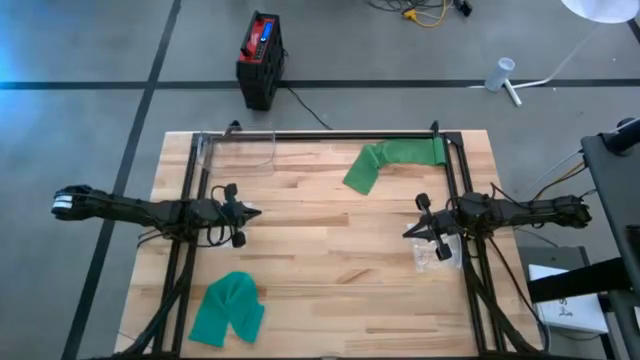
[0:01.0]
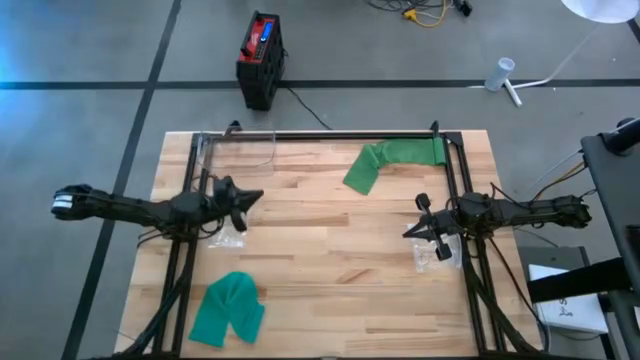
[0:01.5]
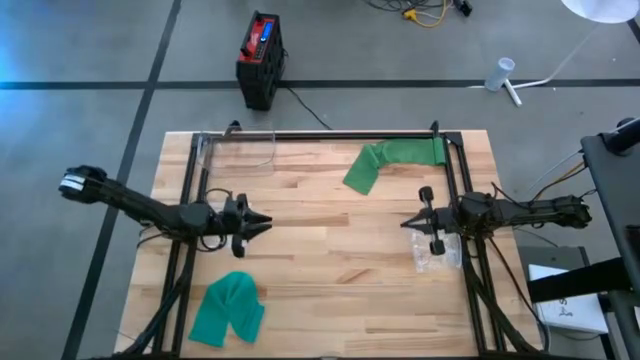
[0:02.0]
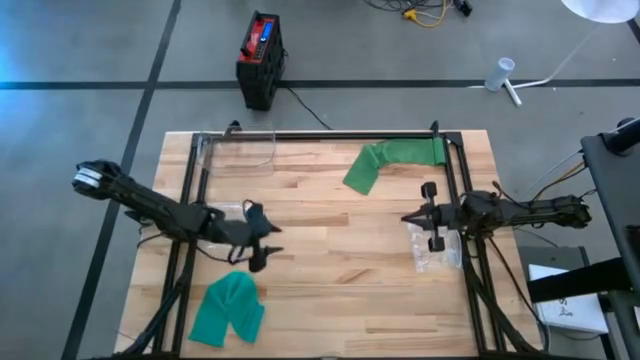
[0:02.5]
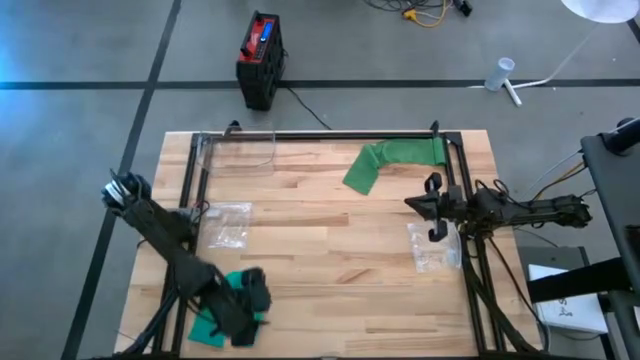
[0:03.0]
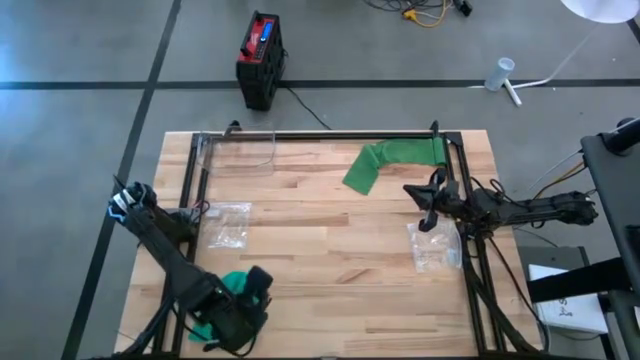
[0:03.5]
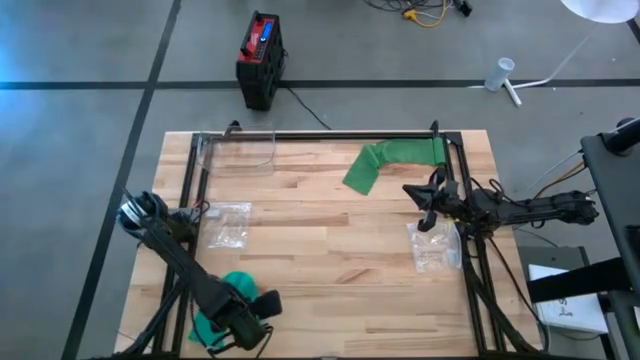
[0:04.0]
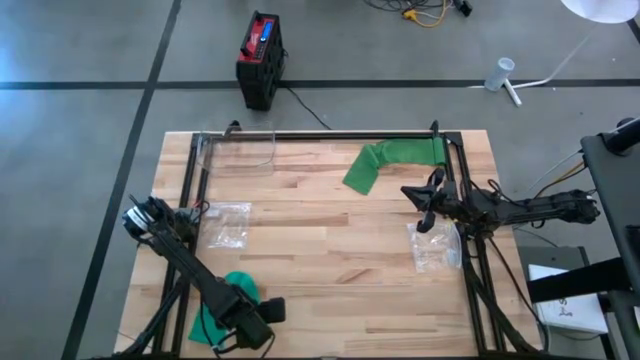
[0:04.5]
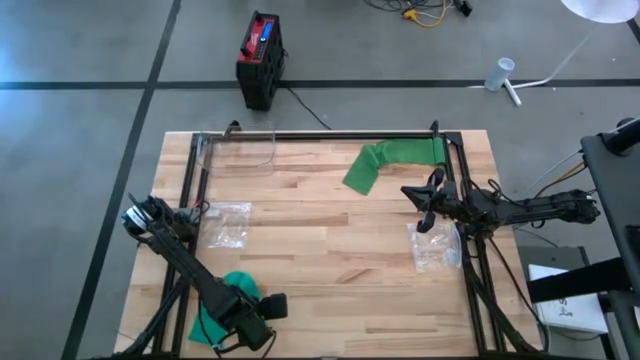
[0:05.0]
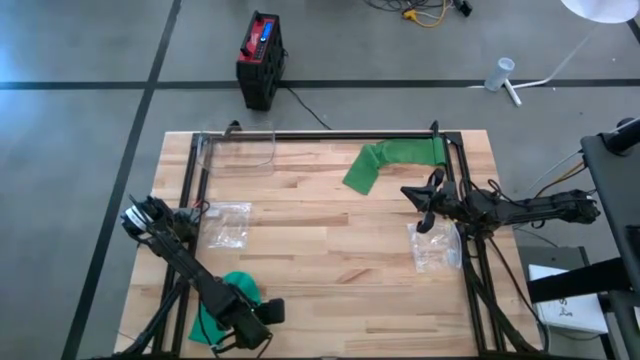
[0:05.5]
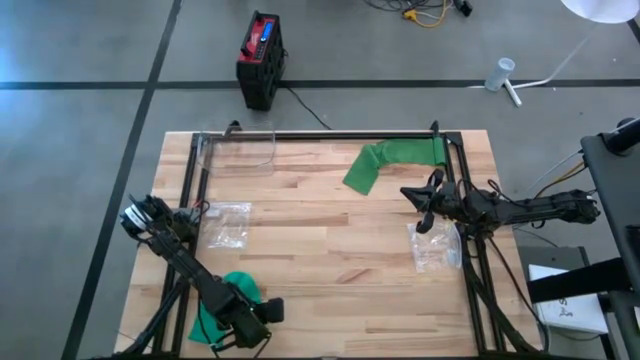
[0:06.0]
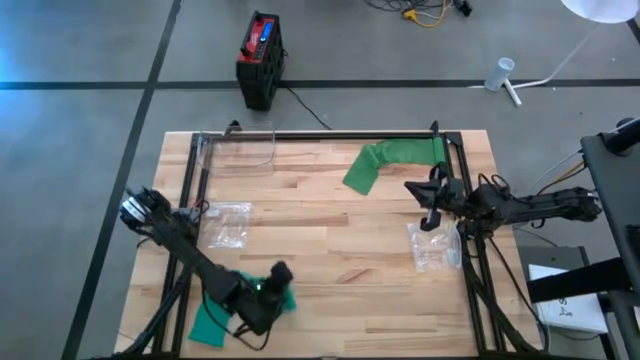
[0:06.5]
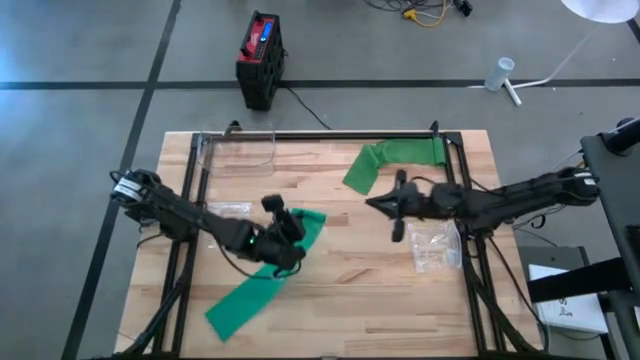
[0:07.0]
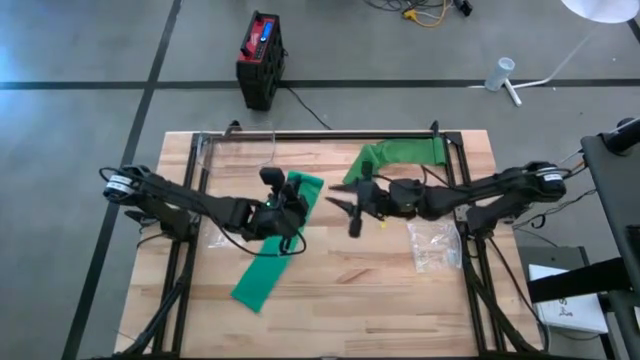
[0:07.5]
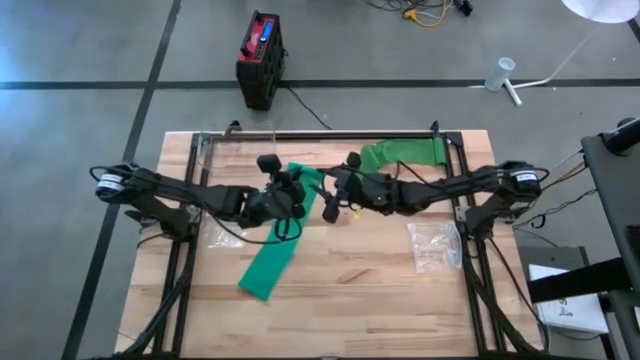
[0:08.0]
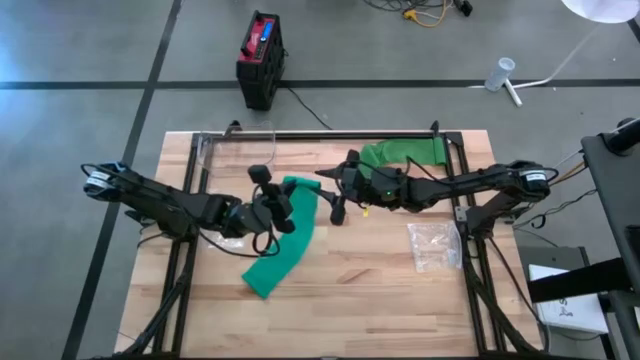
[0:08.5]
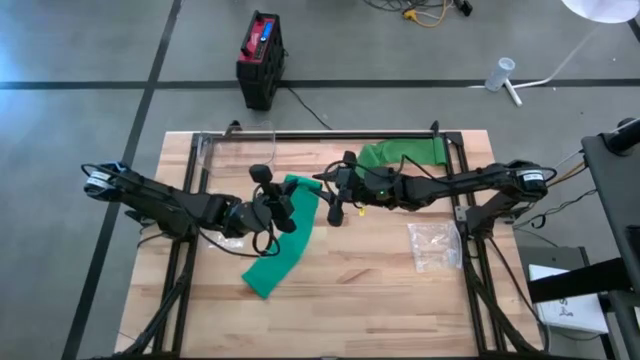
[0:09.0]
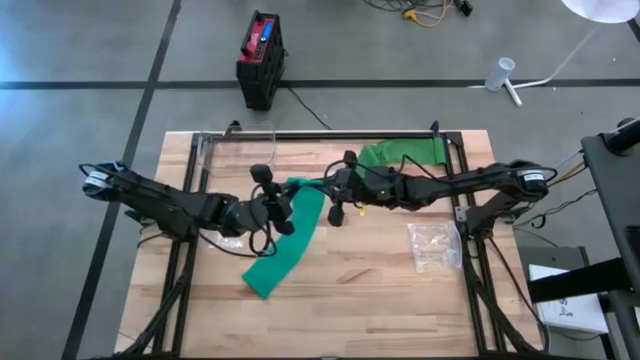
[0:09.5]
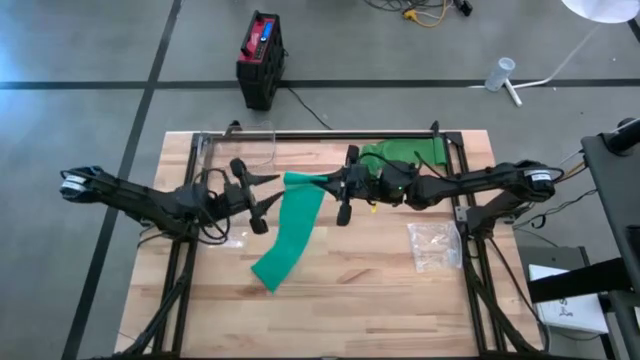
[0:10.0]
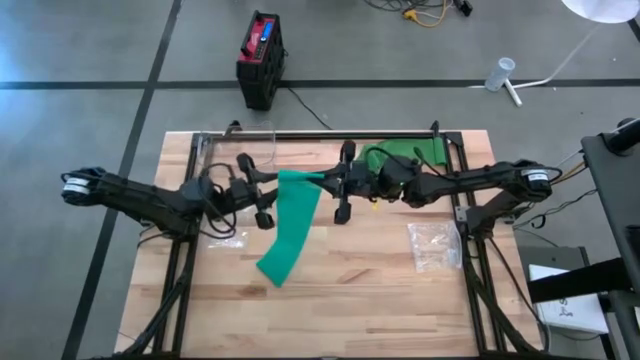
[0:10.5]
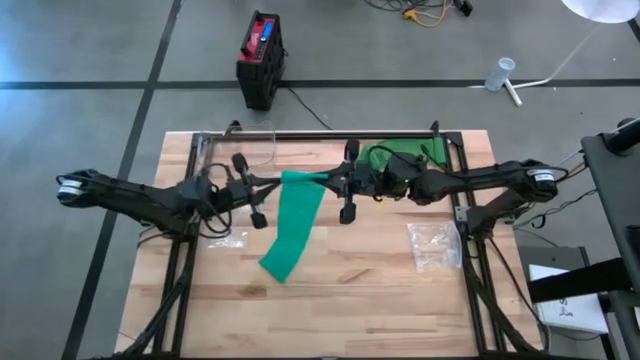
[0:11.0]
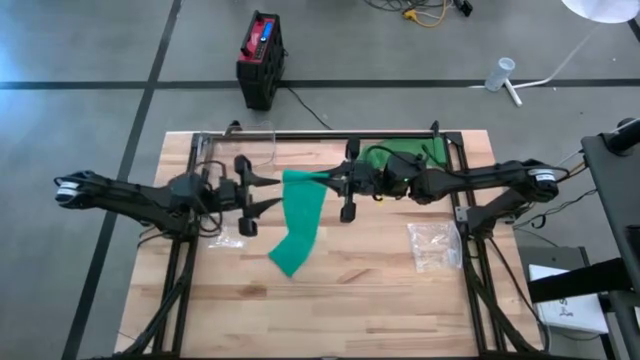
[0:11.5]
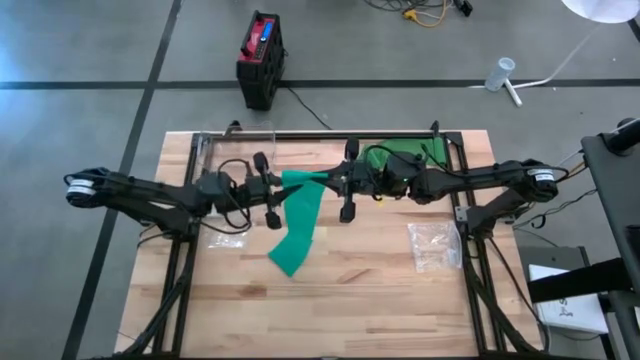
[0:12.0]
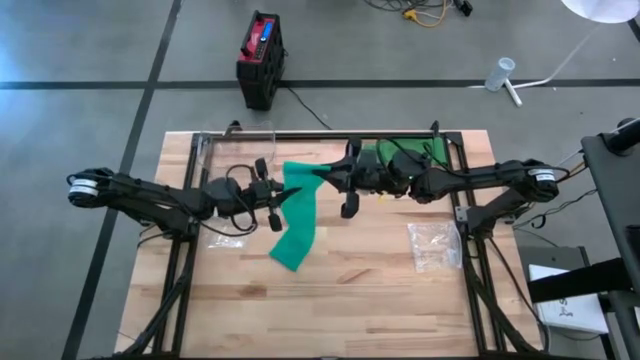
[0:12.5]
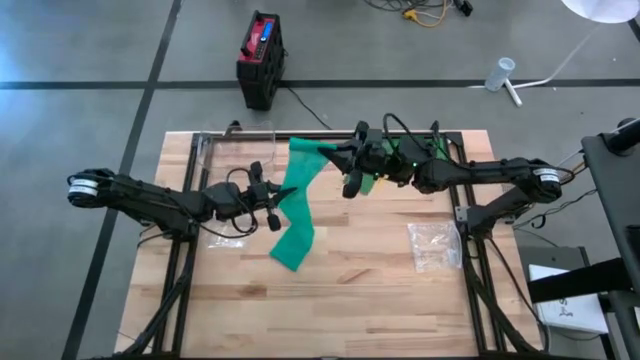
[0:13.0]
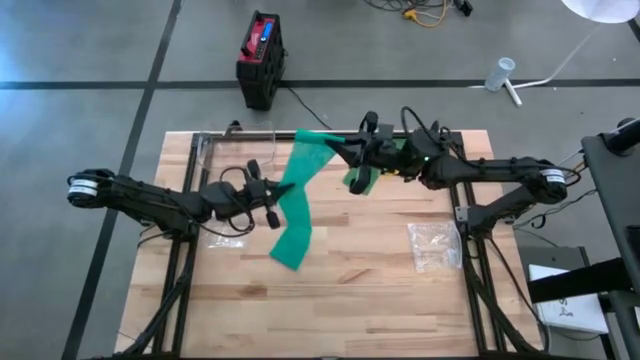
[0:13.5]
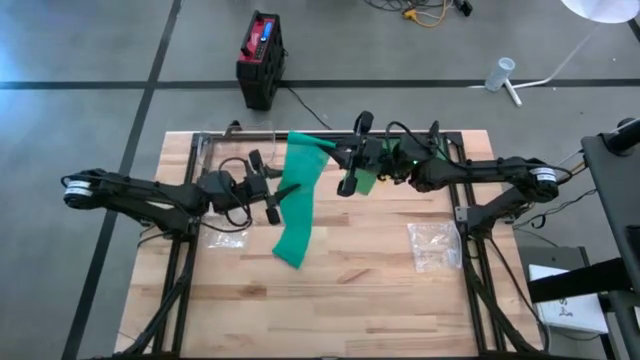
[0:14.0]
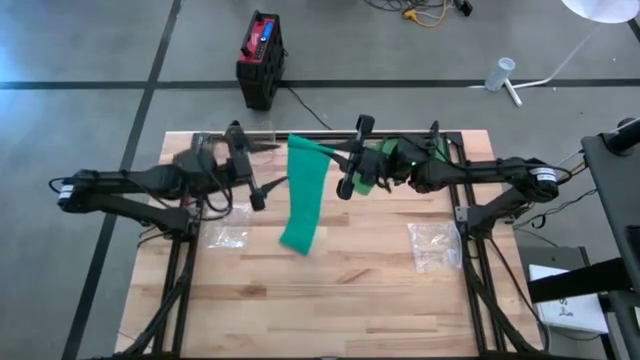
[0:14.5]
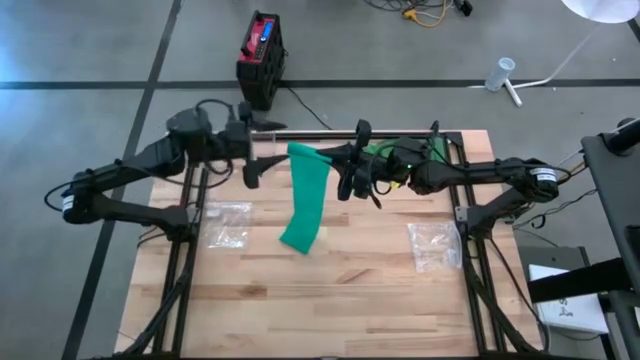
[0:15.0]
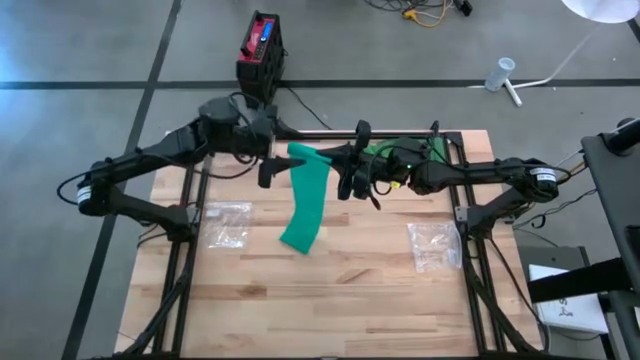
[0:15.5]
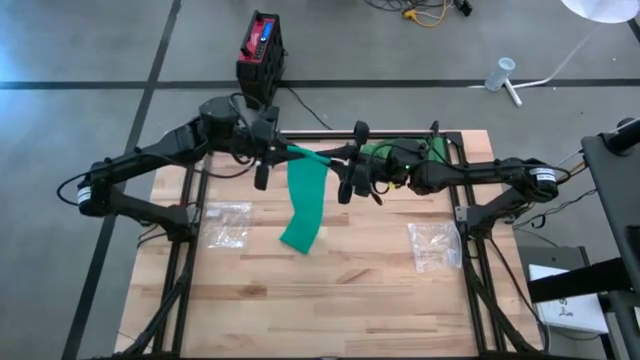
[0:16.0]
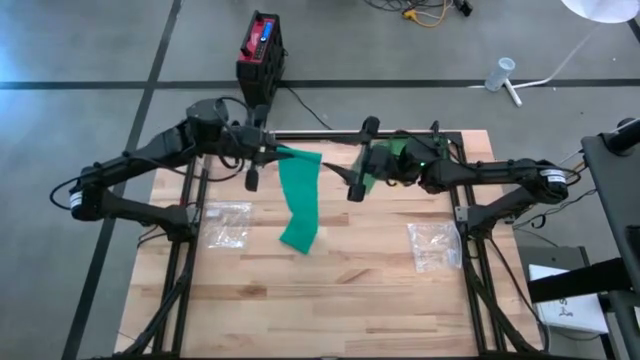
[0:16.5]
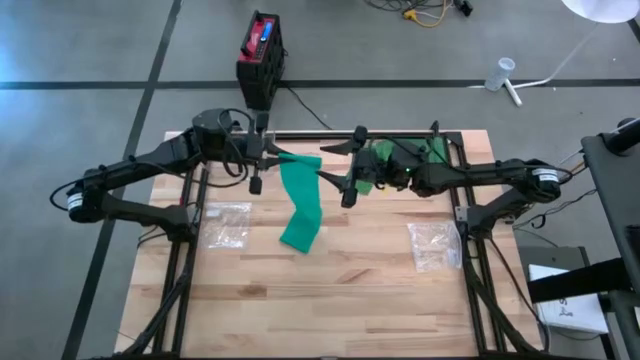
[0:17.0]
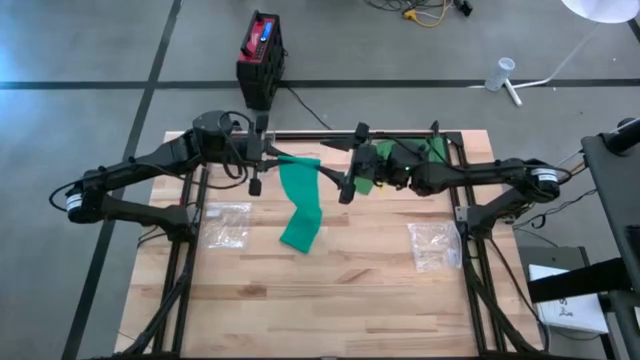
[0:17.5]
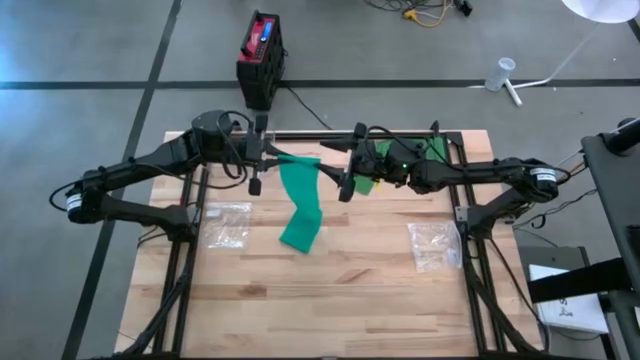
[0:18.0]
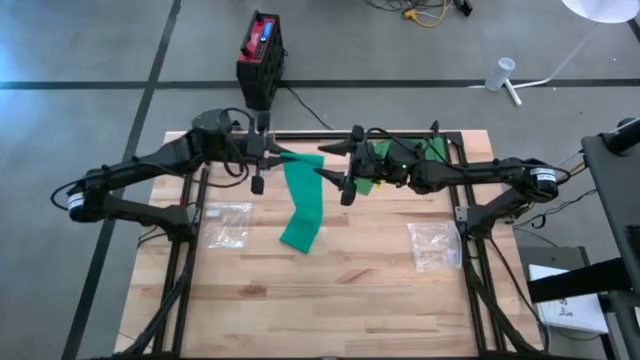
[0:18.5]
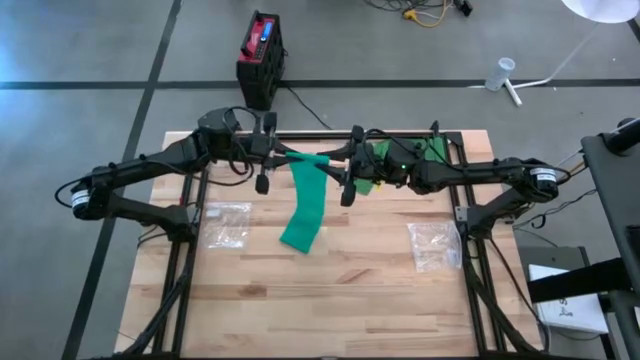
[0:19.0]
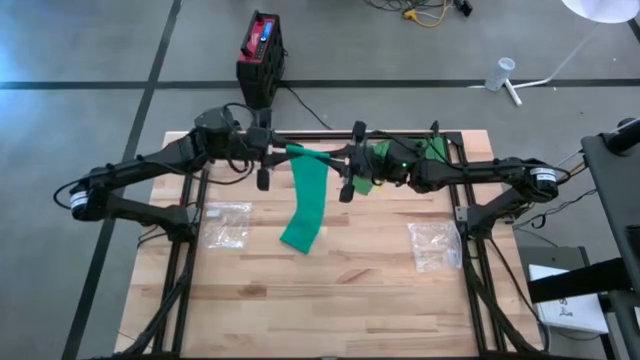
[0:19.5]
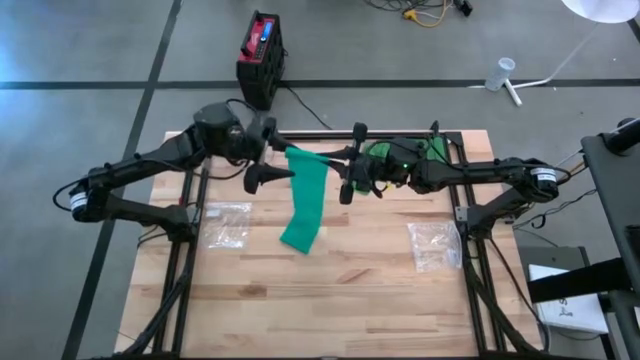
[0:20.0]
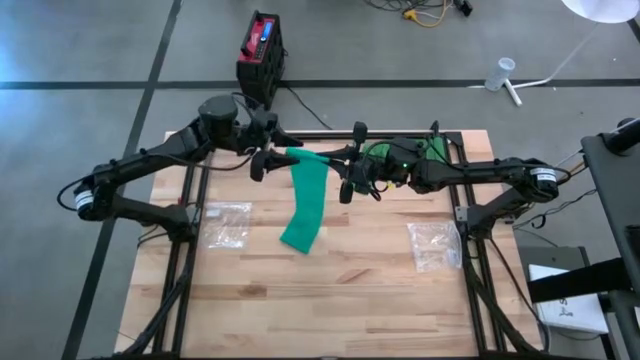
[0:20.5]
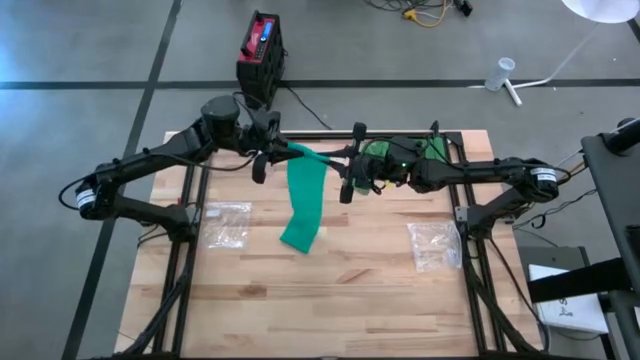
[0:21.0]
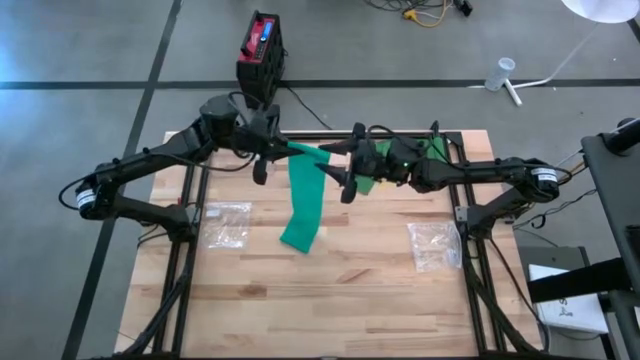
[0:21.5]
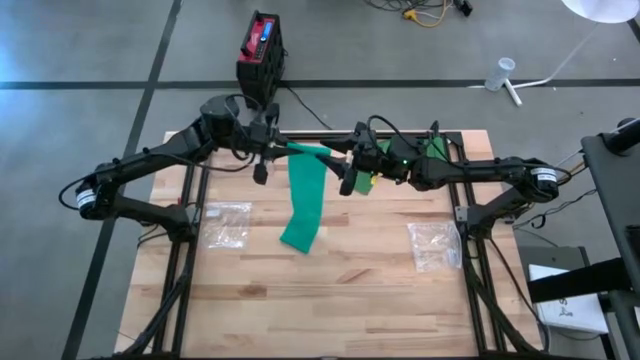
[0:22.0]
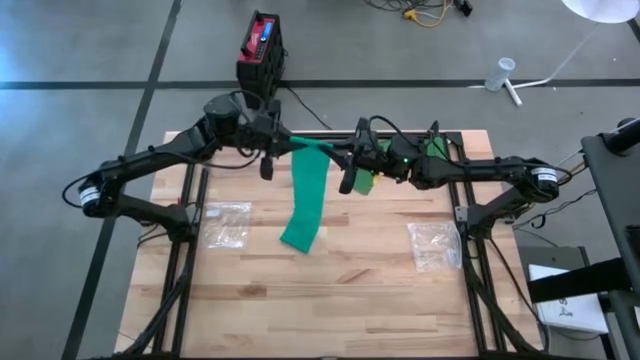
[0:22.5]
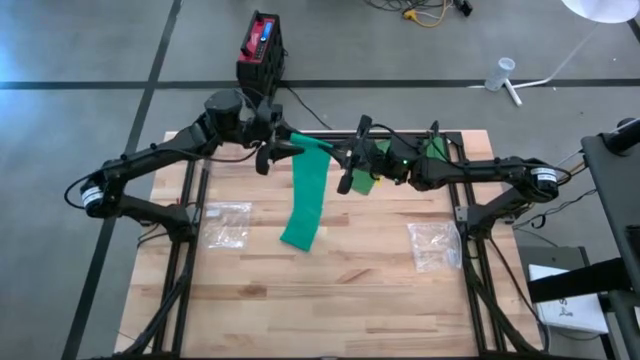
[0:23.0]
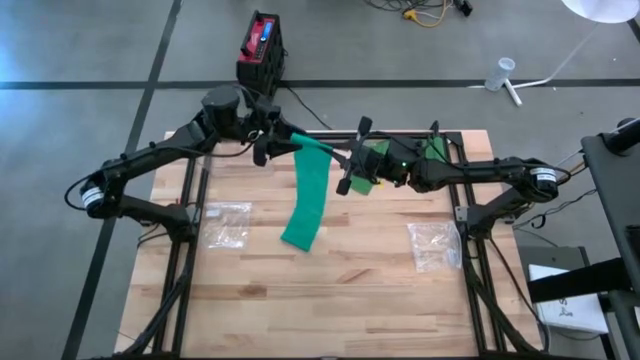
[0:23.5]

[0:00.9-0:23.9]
Task: Roll bandage
Roll the blue bandage
